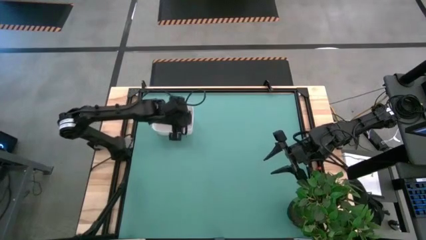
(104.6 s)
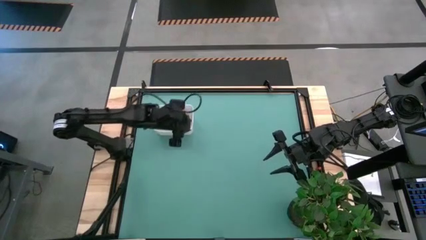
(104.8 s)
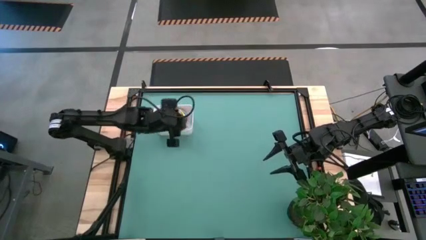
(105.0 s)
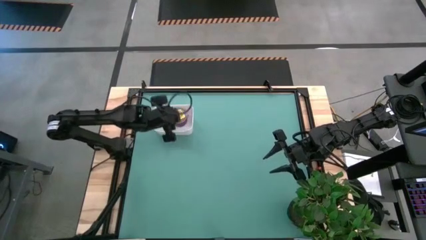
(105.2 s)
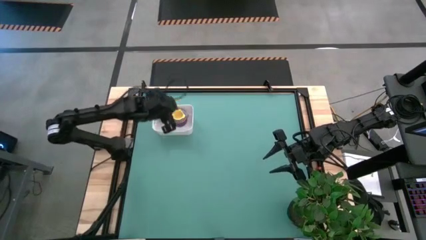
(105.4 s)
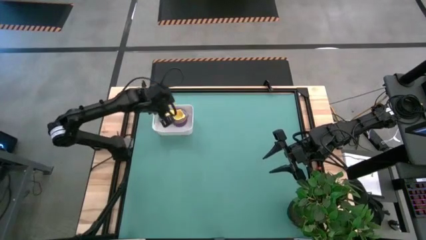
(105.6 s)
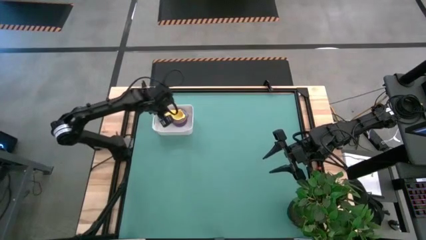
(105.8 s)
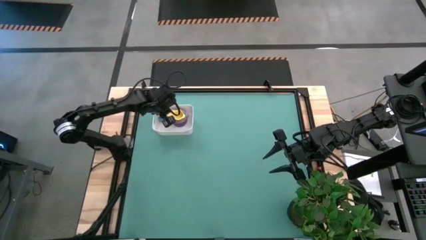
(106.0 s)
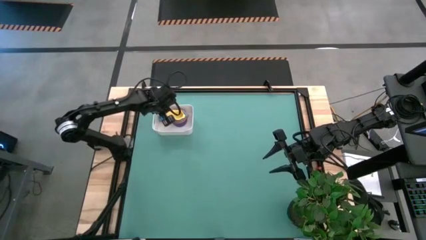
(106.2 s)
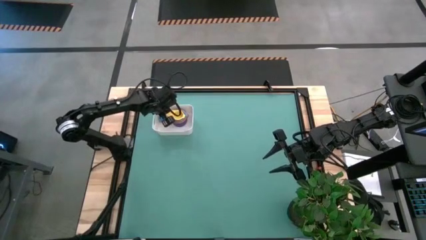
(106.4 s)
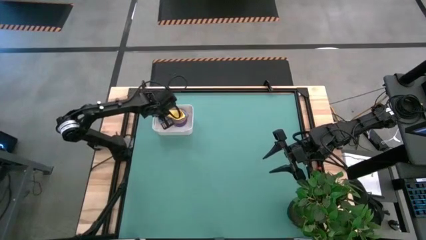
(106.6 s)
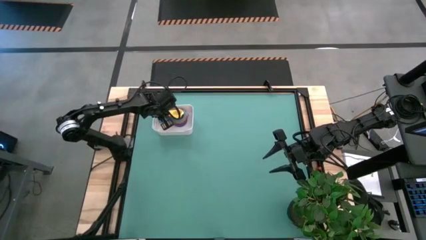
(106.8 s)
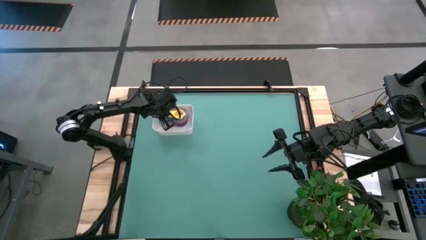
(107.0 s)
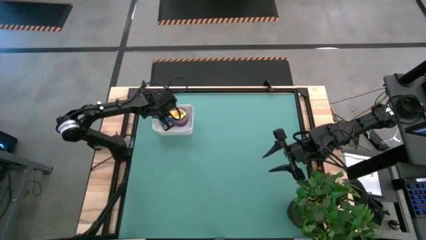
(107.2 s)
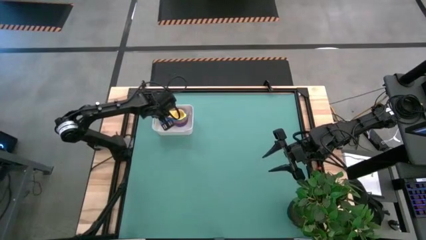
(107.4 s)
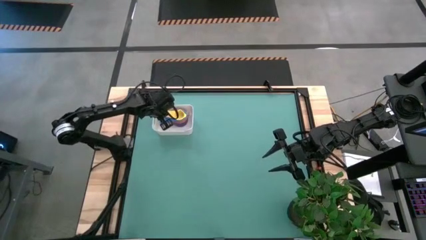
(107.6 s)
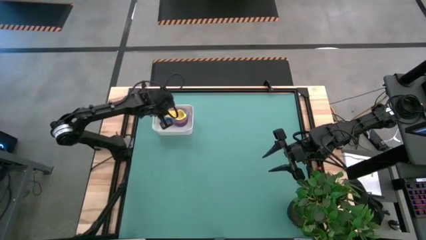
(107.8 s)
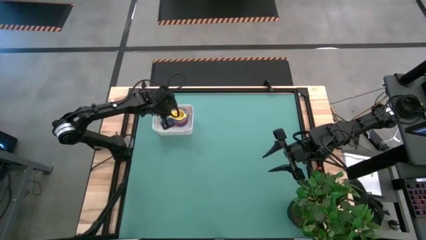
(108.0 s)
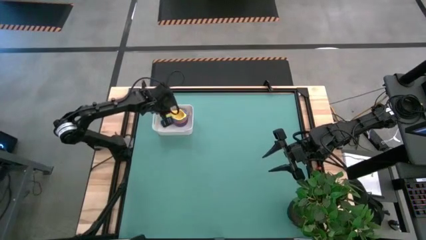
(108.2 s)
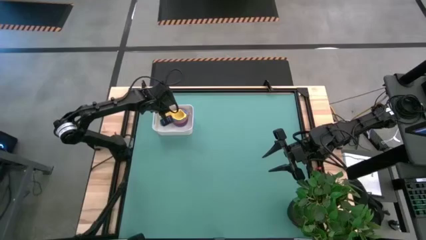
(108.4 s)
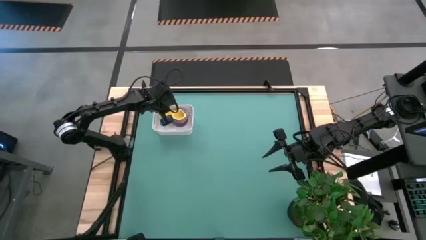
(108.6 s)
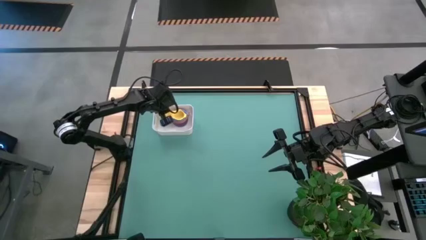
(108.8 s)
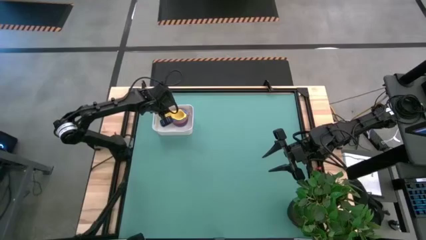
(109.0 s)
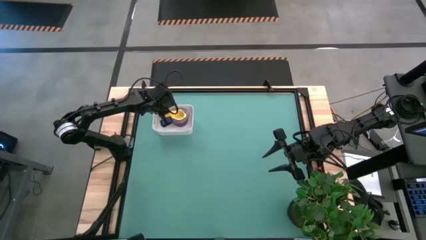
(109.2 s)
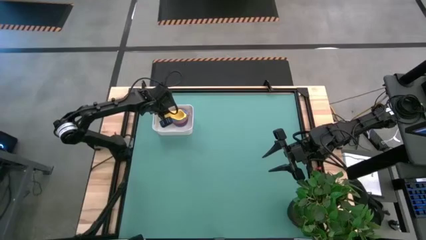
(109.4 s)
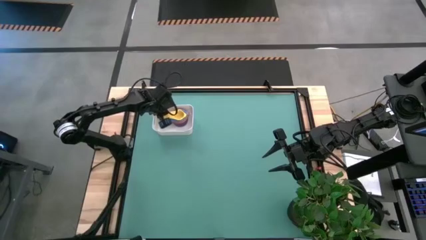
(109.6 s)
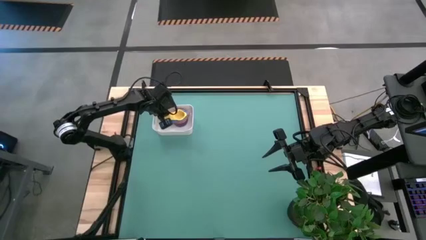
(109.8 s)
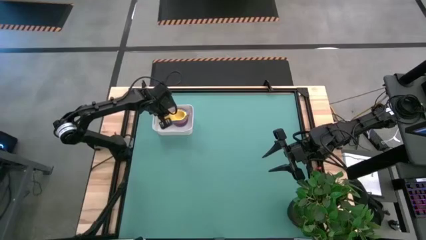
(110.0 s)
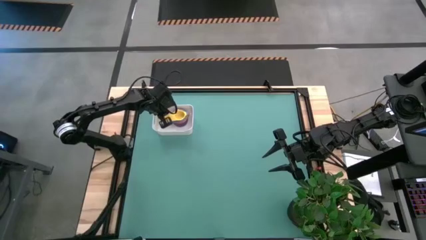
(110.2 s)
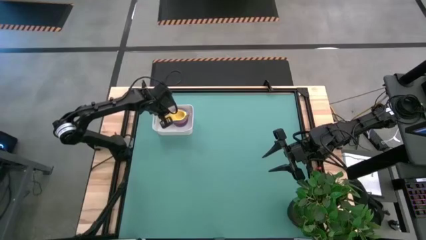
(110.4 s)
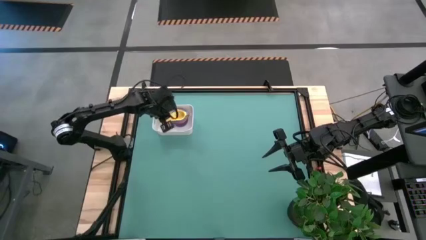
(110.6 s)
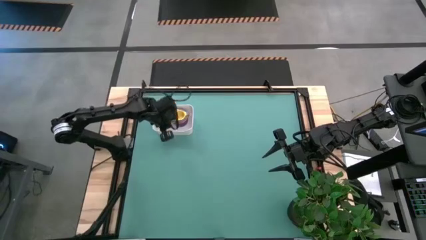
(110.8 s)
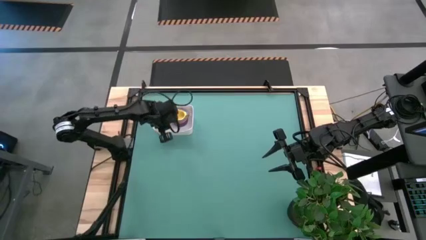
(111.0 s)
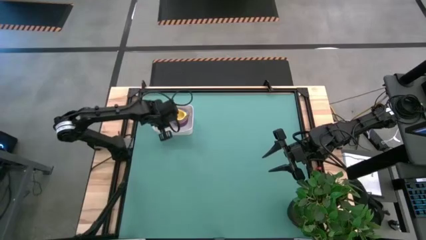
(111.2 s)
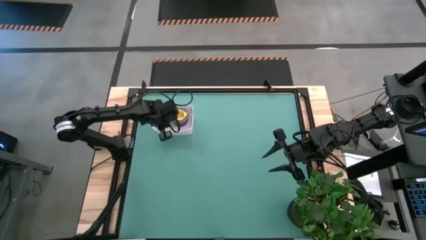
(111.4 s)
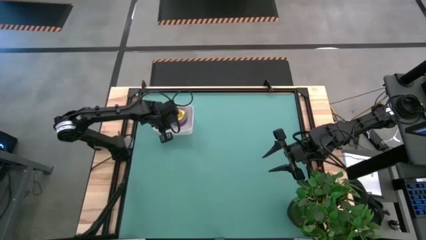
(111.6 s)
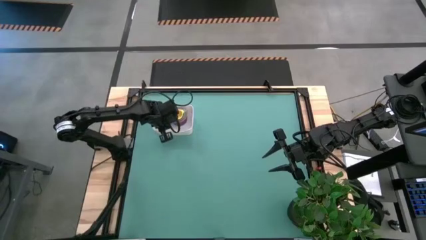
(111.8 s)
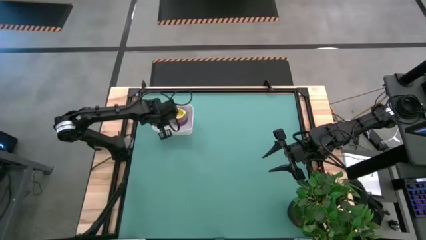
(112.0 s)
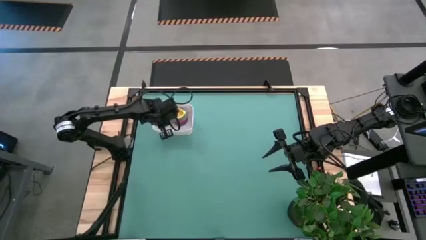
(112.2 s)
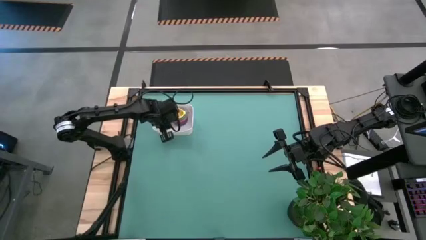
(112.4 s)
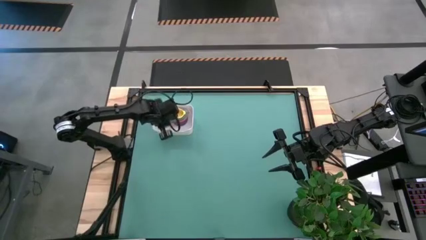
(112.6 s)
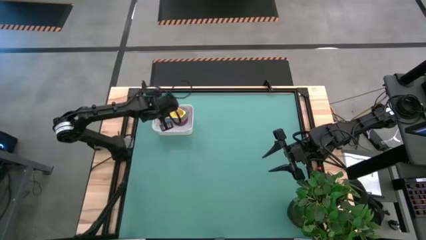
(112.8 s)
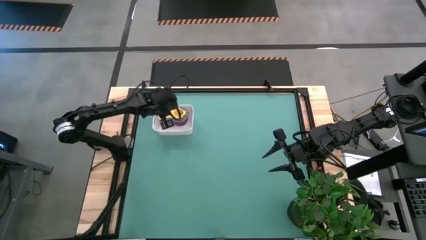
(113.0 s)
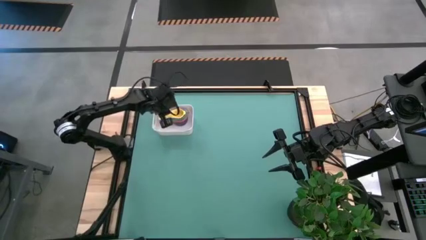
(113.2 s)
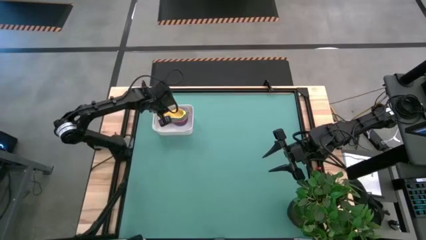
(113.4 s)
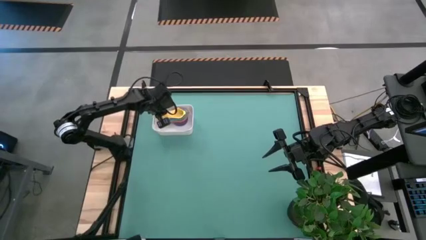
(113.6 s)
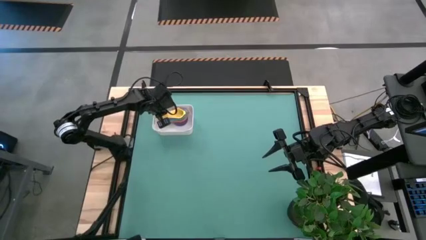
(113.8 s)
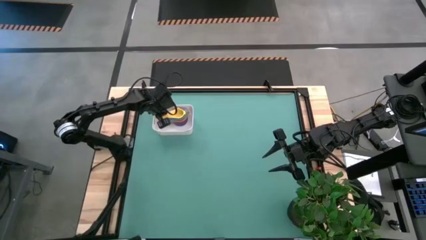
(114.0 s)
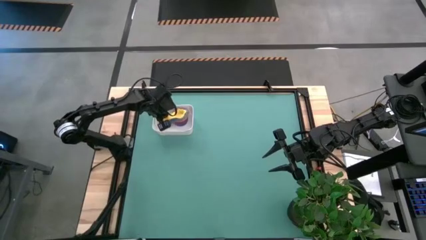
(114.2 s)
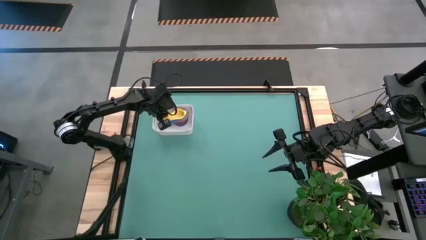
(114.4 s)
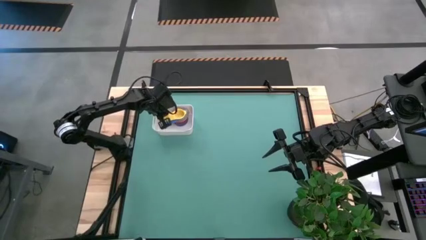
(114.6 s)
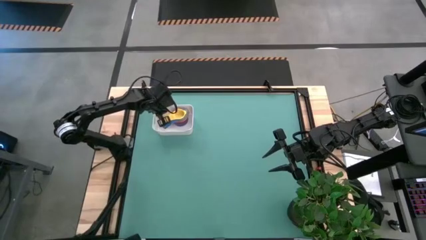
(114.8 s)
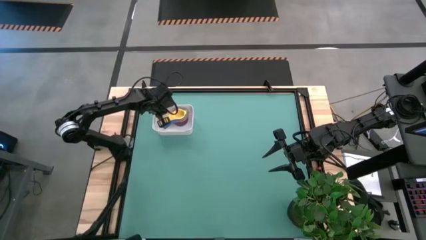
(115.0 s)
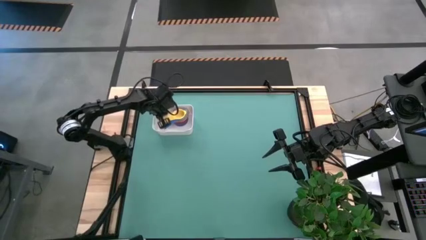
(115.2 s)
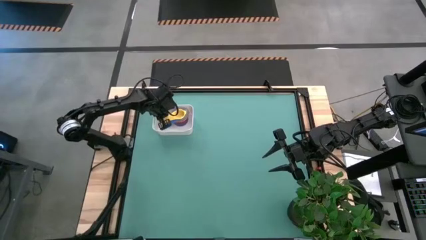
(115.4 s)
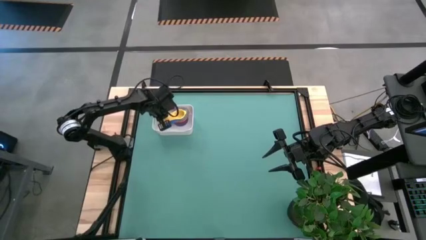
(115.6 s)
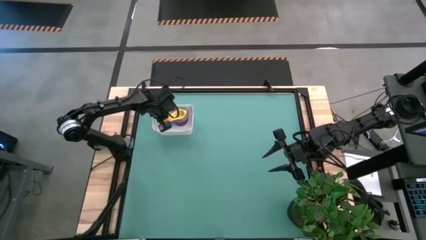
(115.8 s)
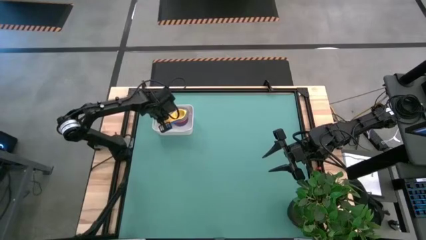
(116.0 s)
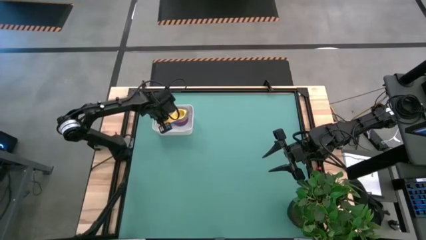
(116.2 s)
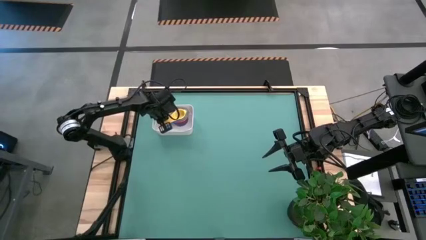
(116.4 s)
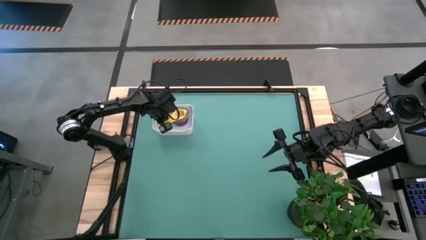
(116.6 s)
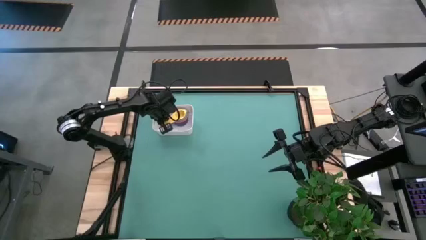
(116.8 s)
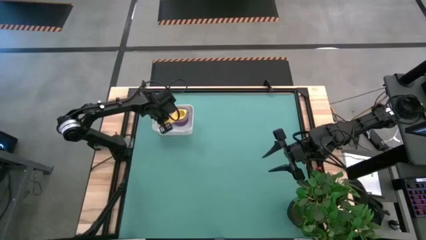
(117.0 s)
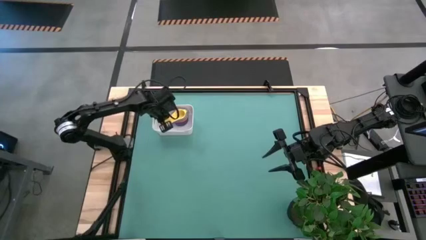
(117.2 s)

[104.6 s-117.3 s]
Task: Nest measuring cups in basket
Put the nested measuring cups into the white bin

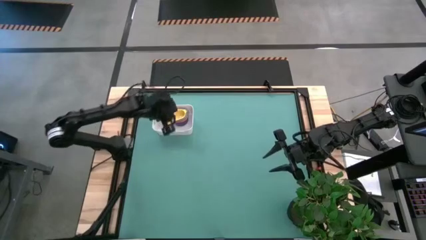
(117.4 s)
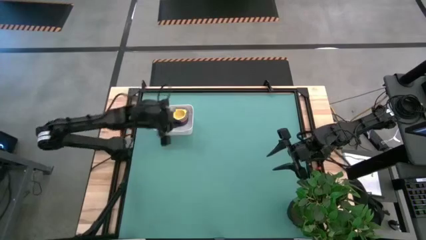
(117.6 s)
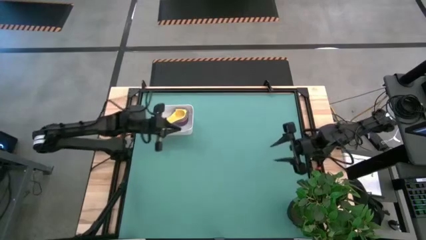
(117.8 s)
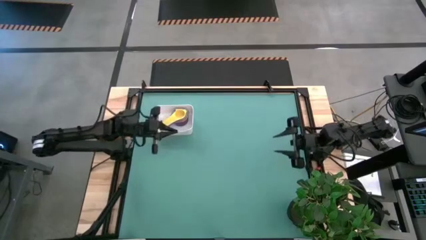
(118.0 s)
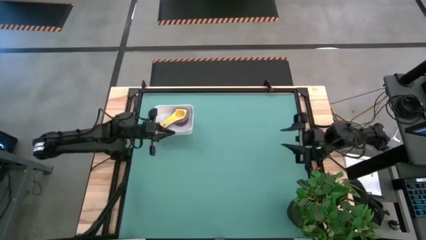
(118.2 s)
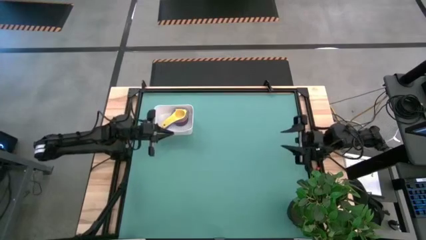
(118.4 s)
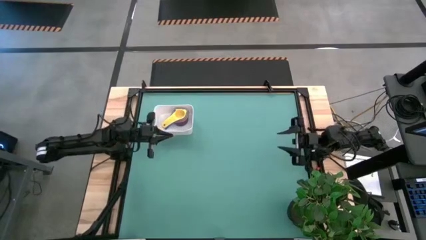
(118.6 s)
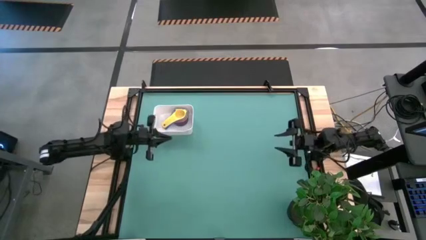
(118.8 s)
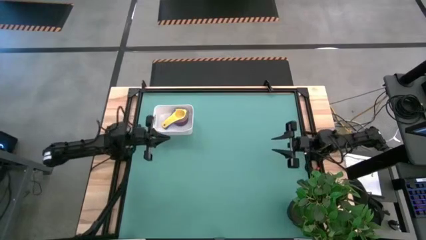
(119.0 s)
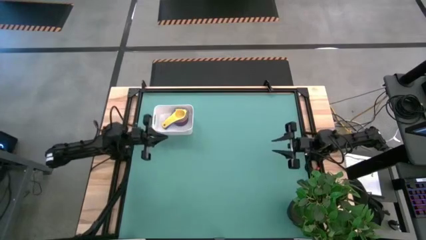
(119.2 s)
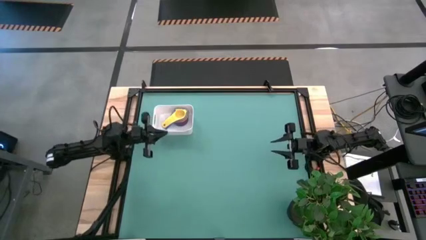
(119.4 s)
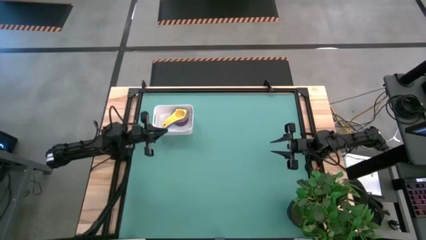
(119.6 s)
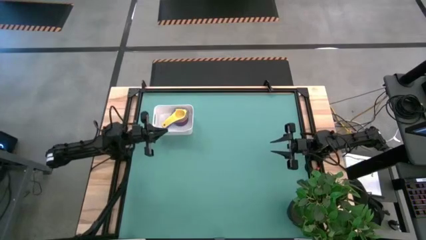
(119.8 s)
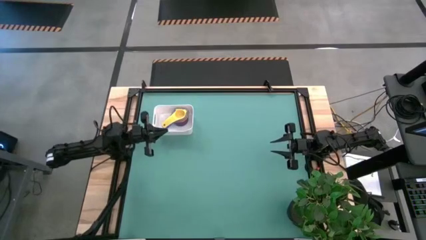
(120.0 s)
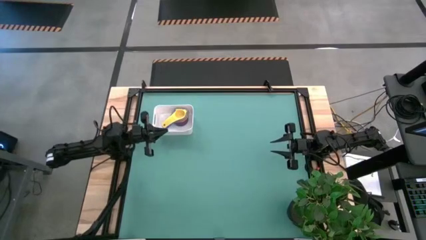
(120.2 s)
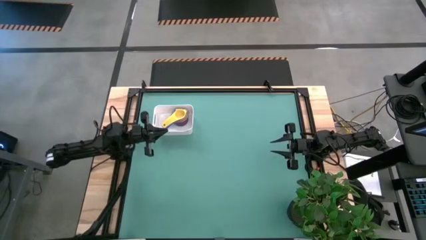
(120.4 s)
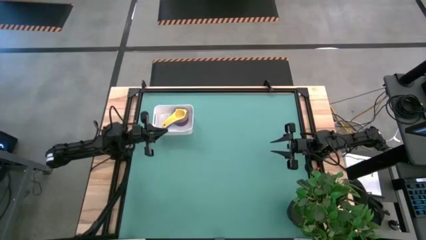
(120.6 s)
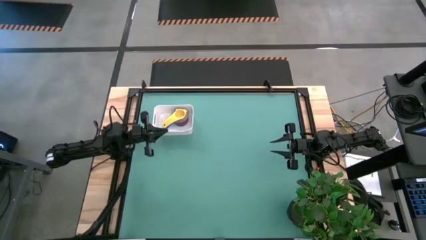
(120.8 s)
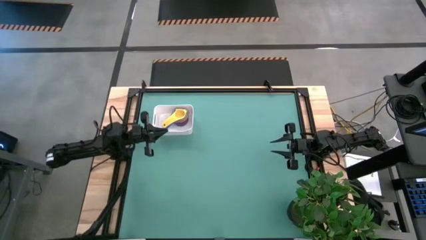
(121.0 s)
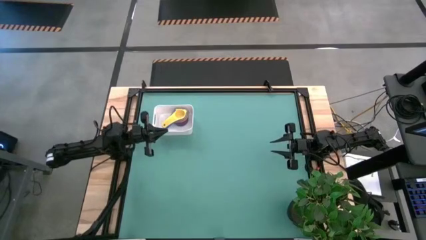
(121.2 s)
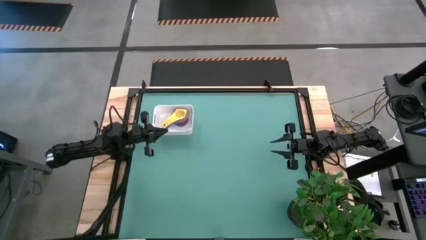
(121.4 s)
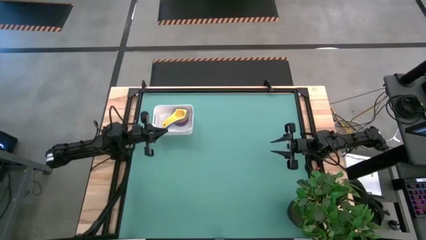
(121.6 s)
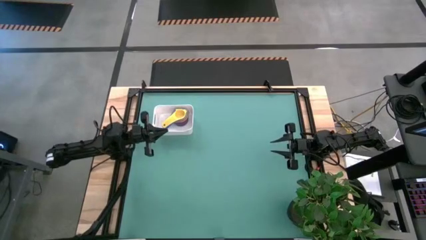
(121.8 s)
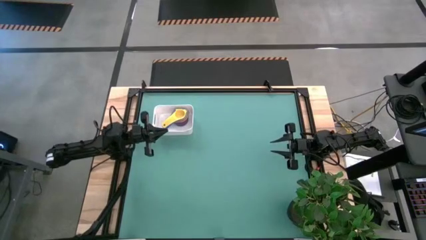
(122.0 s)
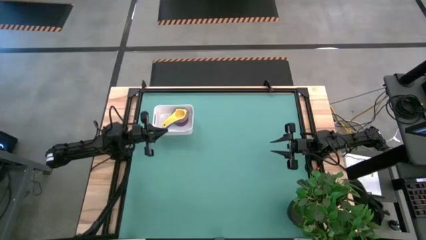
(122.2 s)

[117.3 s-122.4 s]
Return to Home Position
